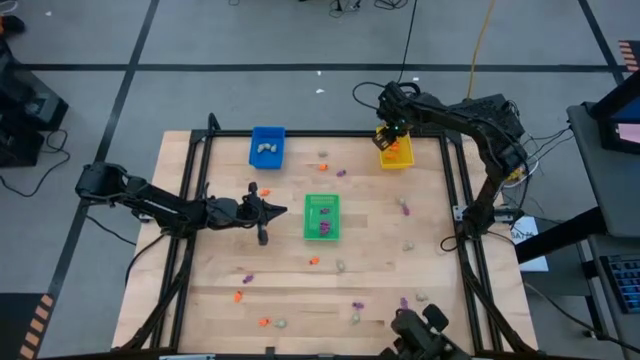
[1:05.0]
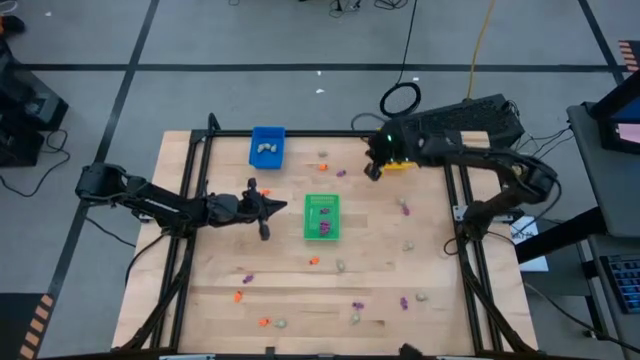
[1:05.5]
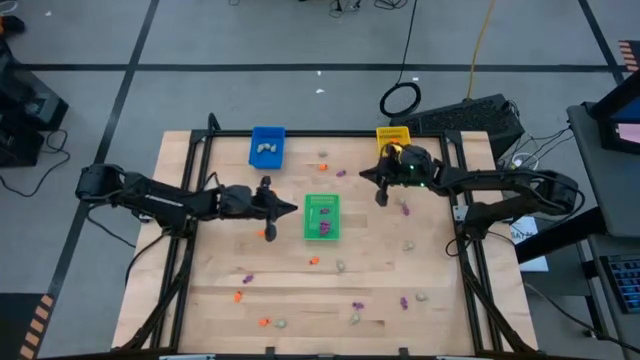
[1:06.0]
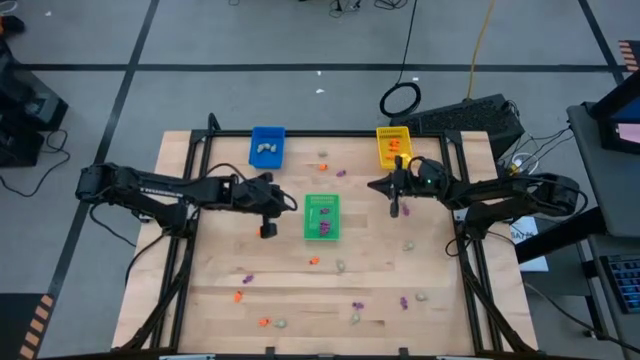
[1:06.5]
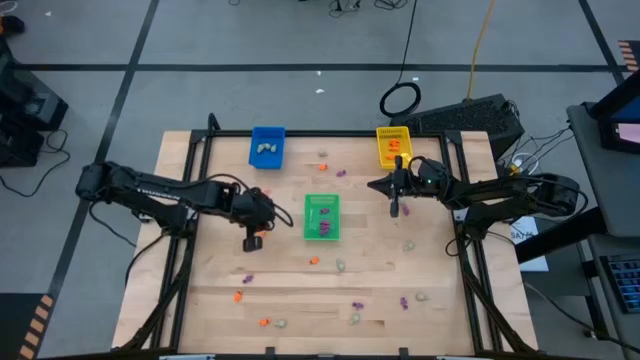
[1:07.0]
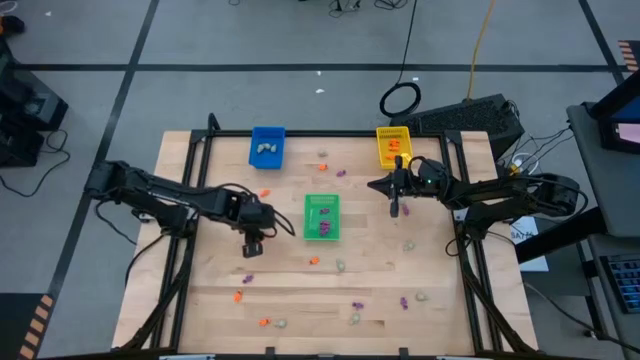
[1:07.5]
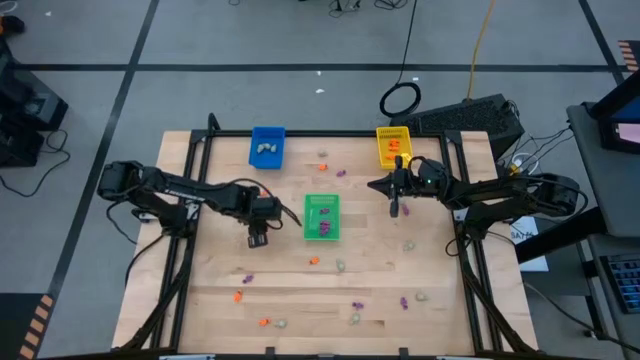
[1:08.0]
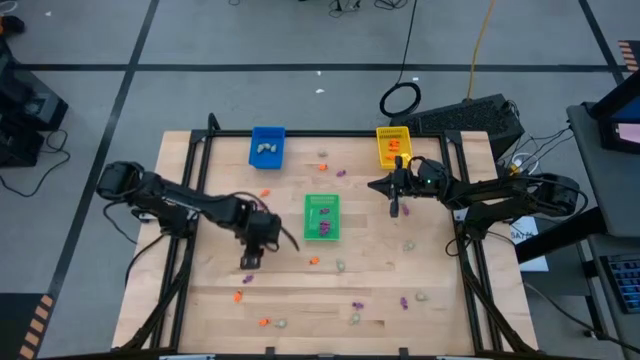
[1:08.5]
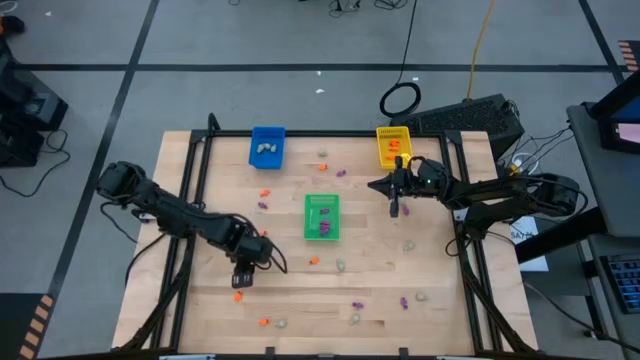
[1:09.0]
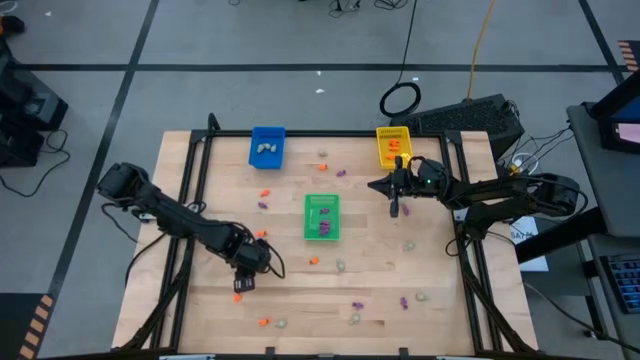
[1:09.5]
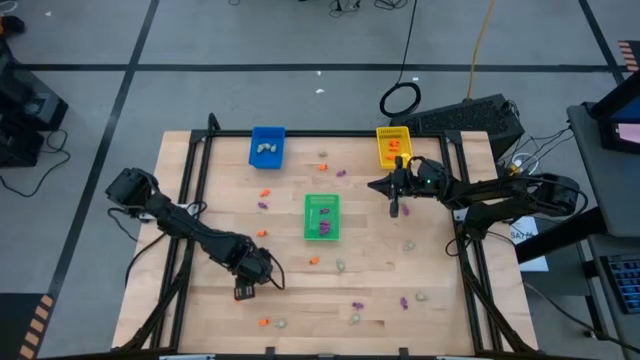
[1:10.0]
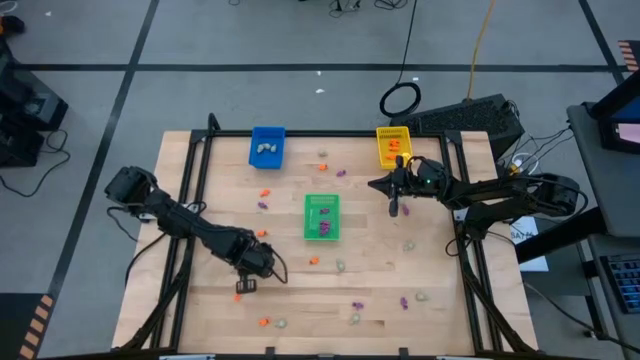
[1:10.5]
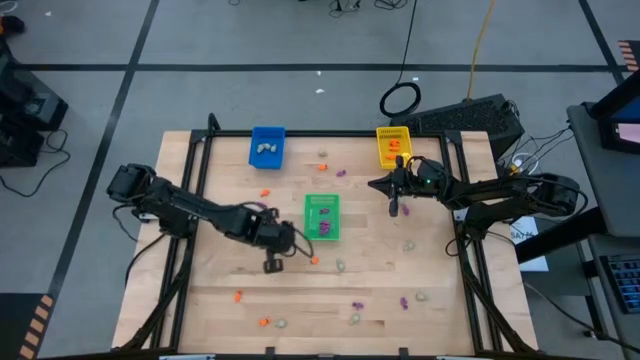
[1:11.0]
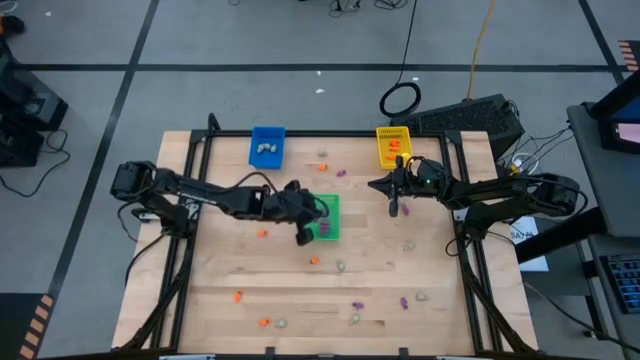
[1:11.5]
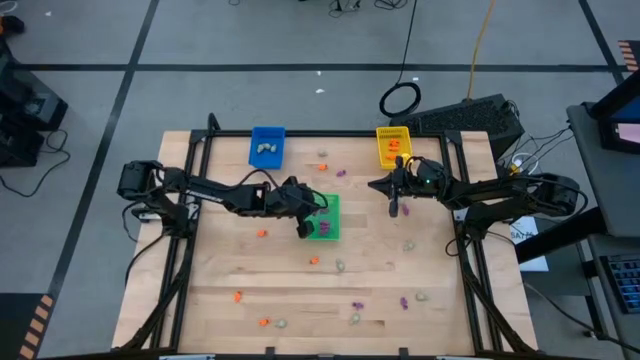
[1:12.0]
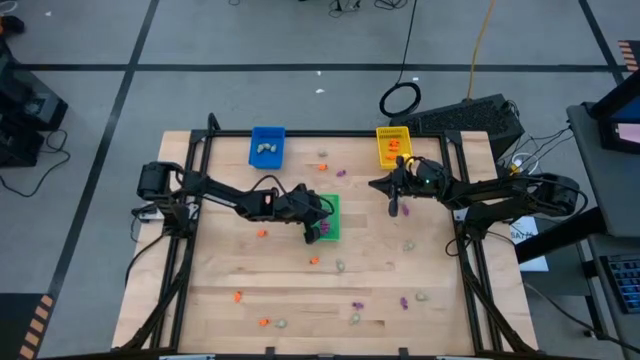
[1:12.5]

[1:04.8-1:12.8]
Task: Sort Halloween decoration
Put the purple skeleton toy into the green bin

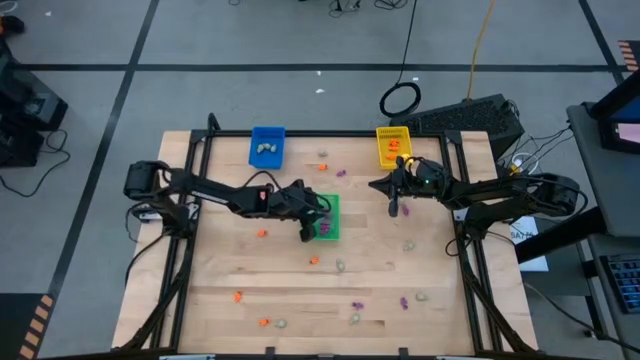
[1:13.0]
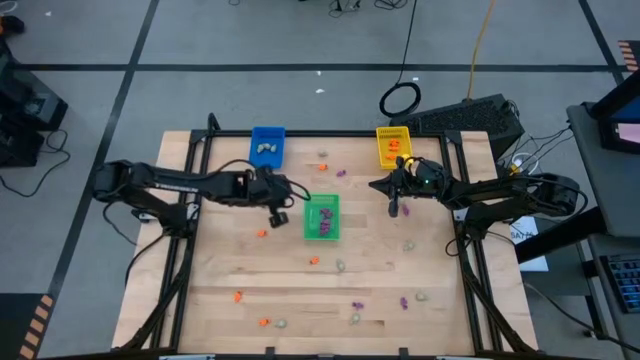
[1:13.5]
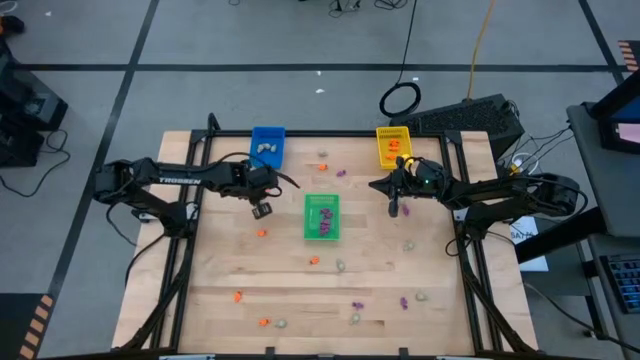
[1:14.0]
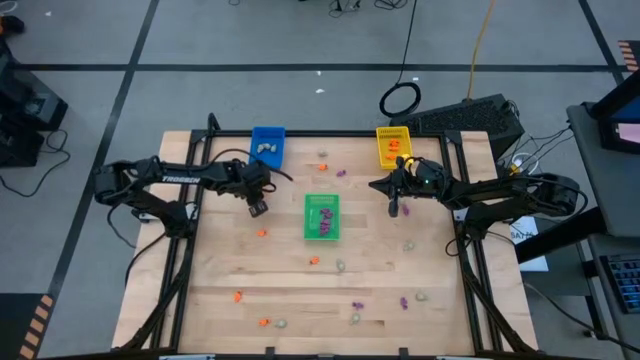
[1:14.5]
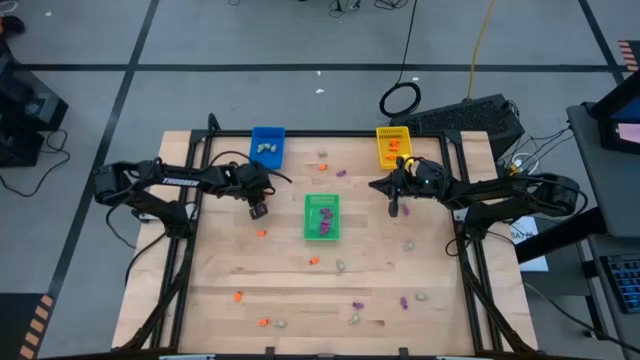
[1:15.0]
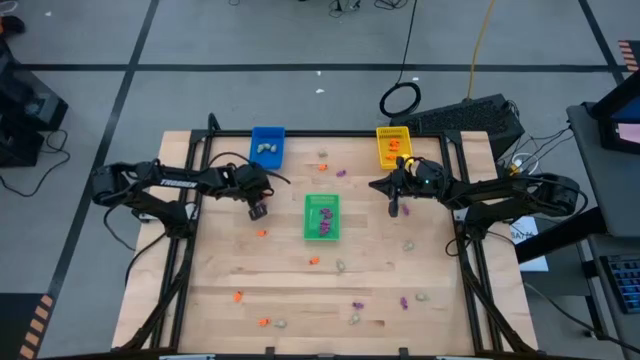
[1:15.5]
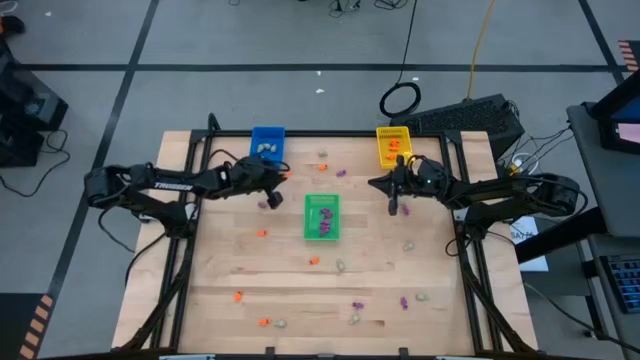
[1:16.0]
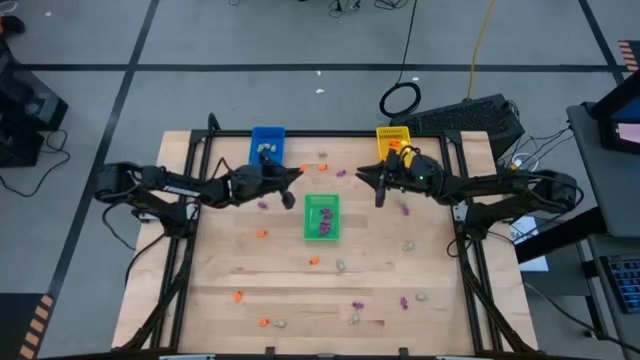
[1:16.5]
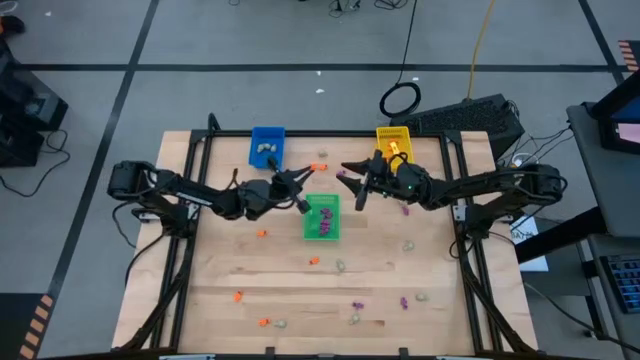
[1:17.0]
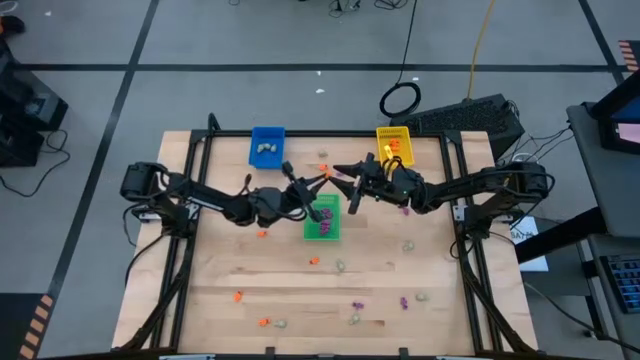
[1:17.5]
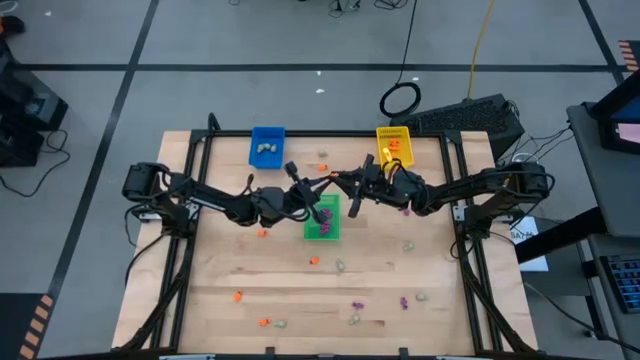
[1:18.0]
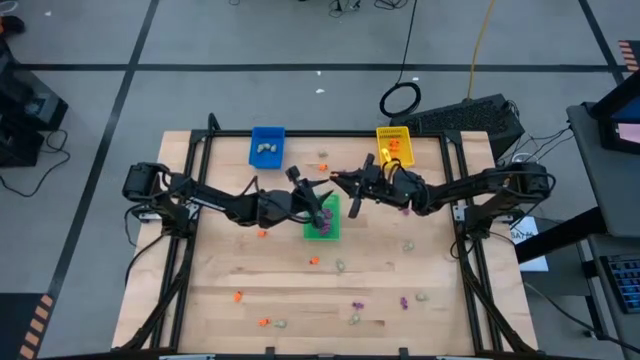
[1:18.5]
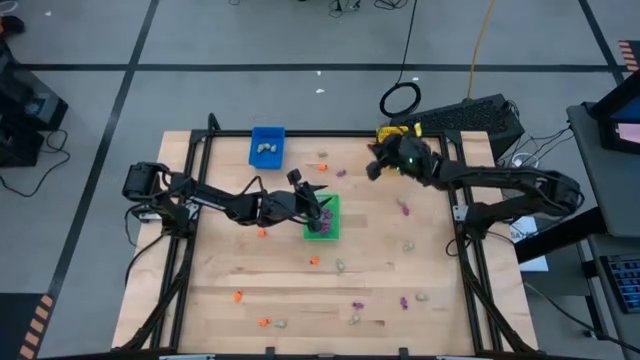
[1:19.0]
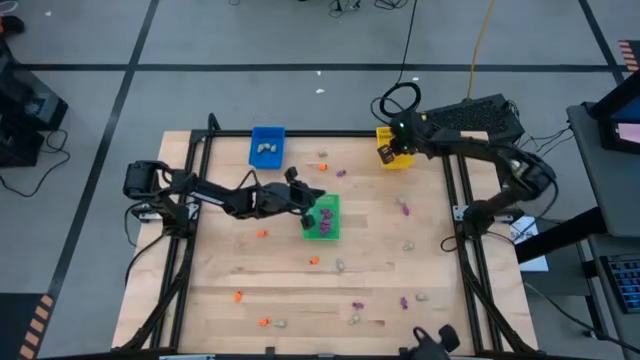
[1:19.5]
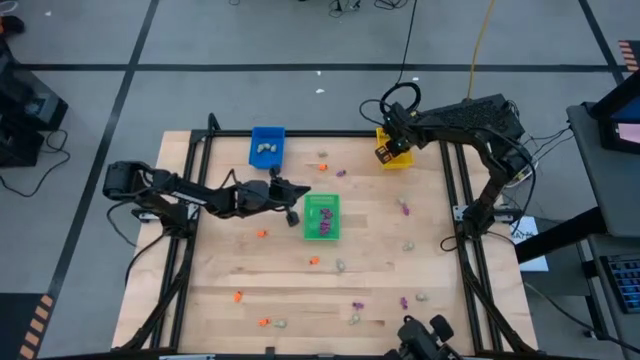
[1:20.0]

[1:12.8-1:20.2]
Put the orange skeleton toy into the yellow bin

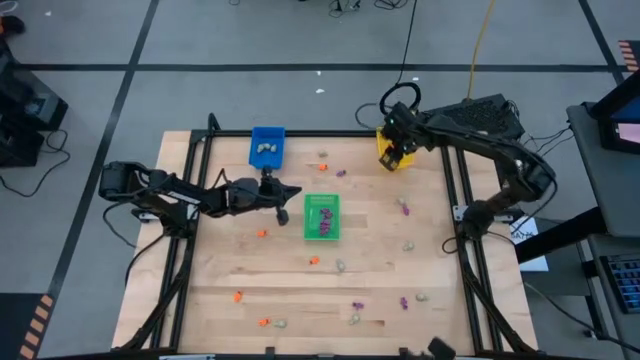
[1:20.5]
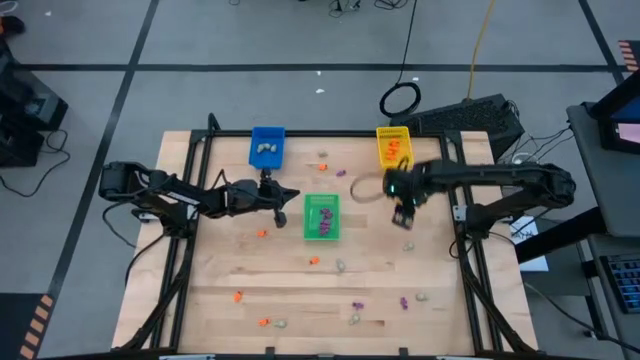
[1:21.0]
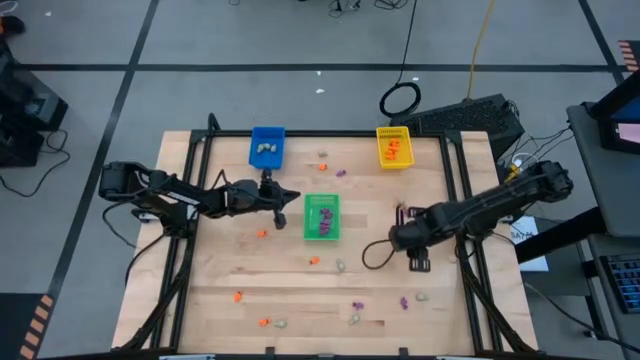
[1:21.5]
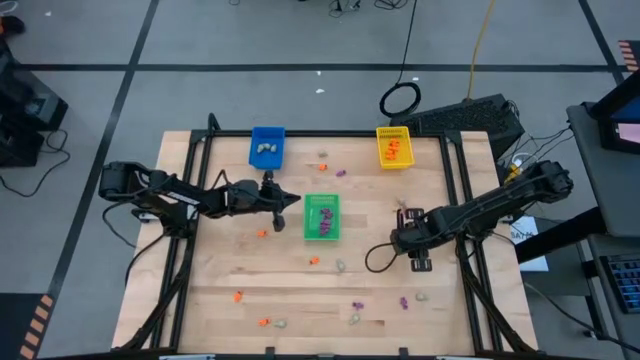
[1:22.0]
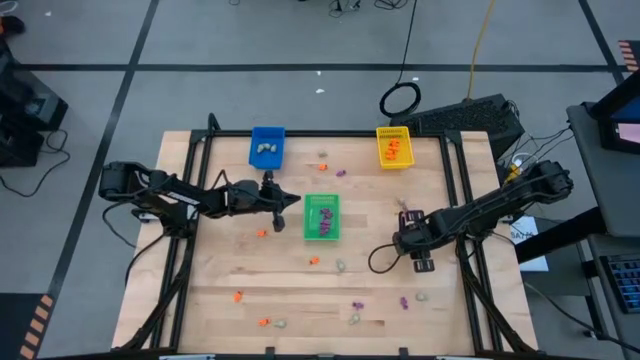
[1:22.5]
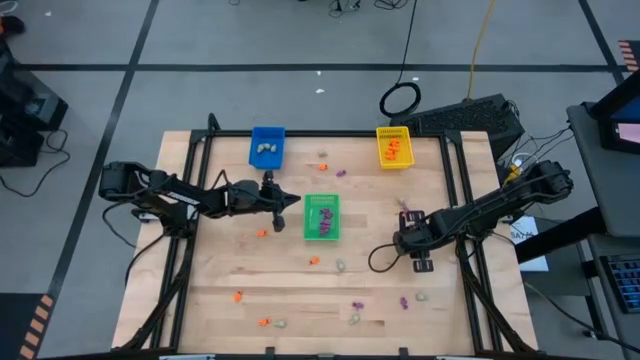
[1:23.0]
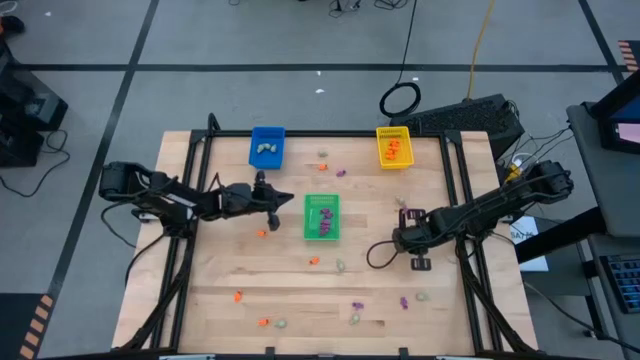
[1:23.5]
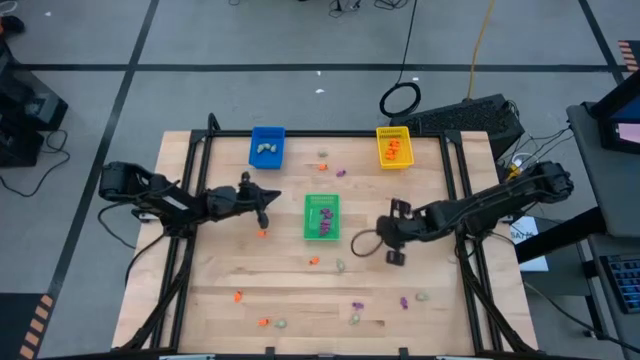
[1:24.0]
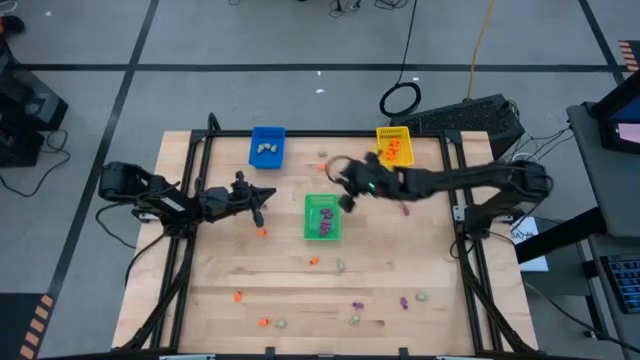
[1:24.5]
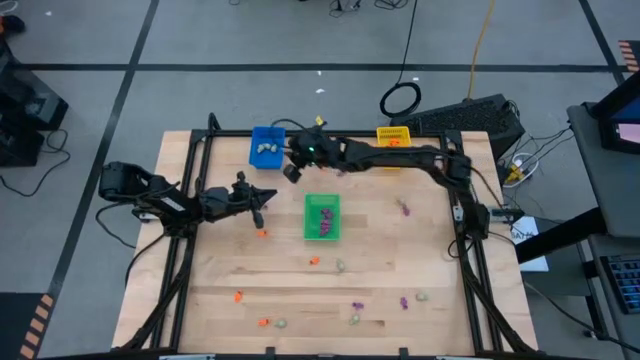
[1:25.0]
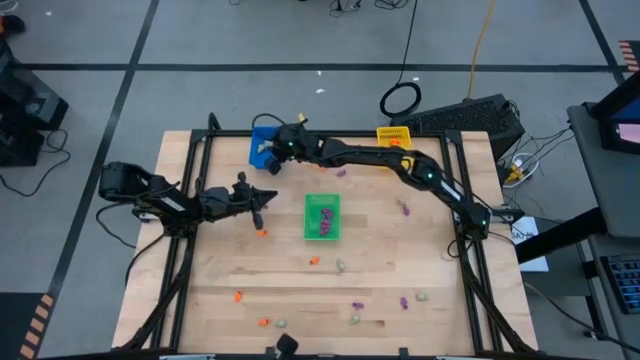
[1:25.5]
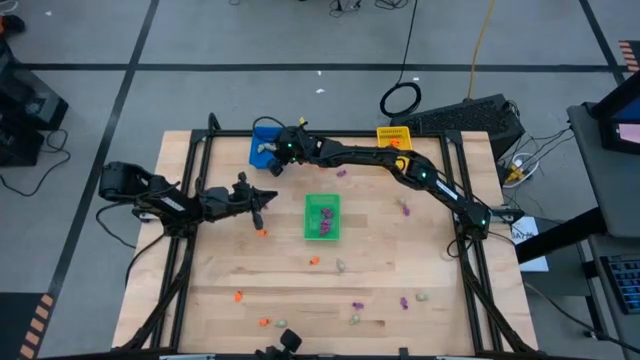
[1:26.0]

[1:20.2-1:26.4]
Put the white skull toy into the blue bin
